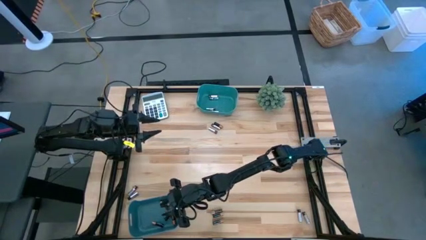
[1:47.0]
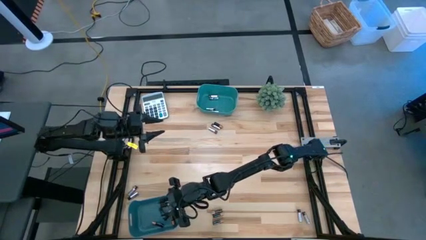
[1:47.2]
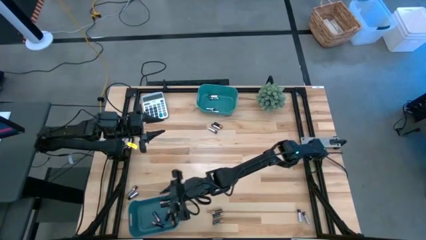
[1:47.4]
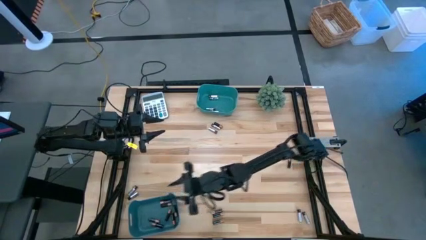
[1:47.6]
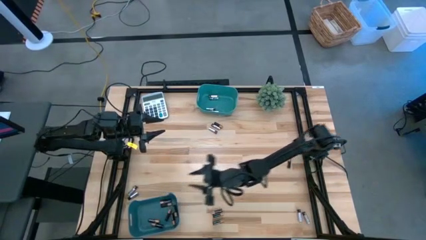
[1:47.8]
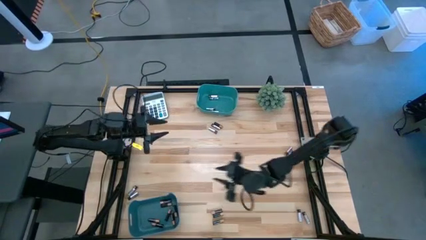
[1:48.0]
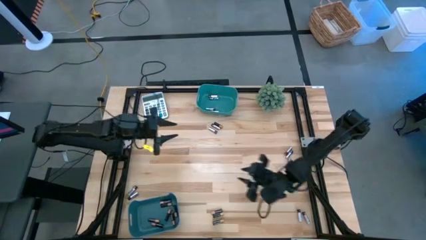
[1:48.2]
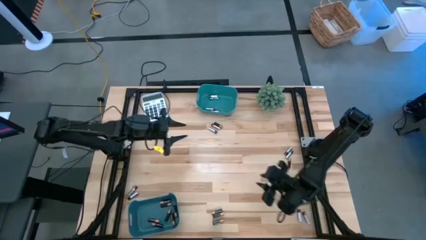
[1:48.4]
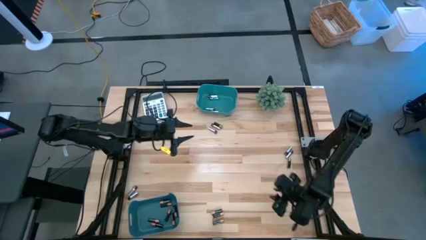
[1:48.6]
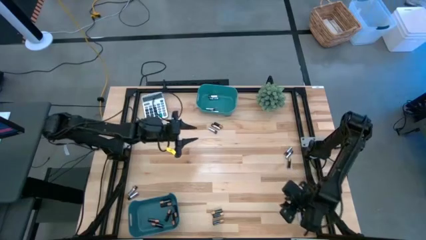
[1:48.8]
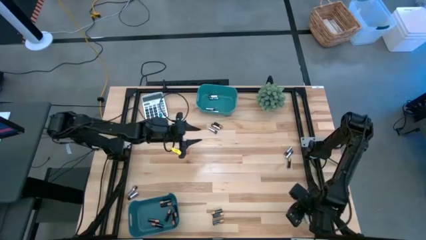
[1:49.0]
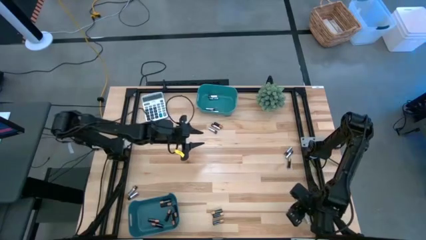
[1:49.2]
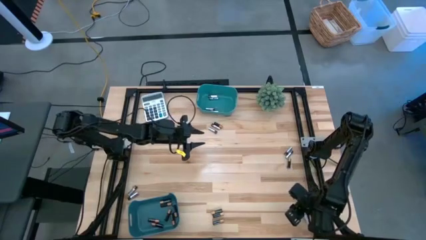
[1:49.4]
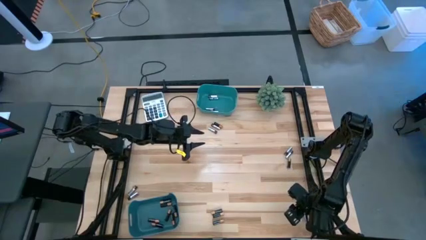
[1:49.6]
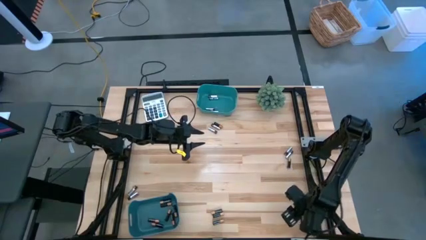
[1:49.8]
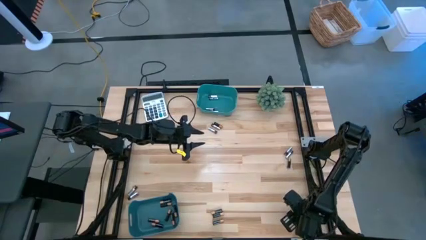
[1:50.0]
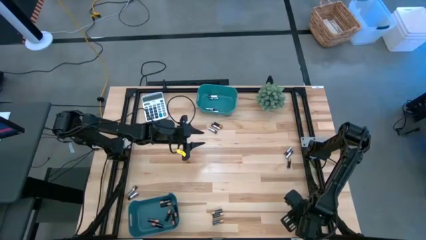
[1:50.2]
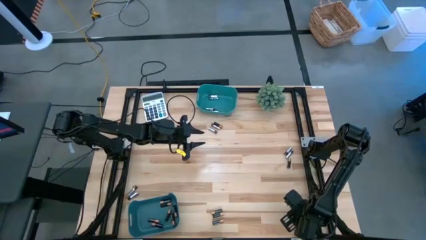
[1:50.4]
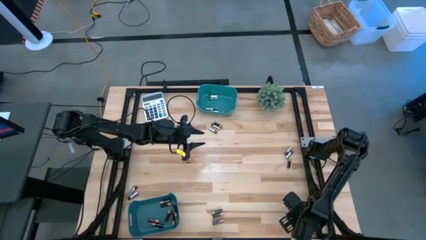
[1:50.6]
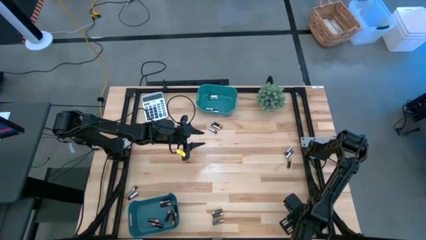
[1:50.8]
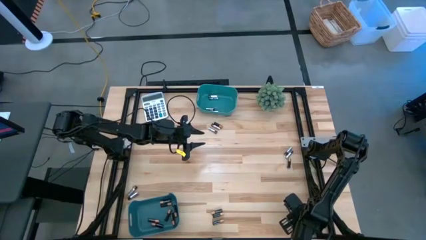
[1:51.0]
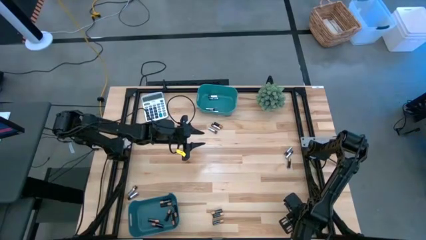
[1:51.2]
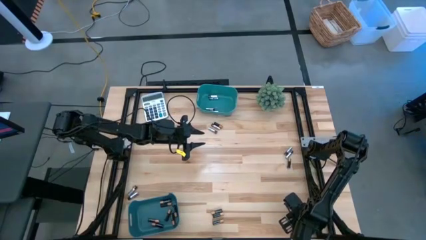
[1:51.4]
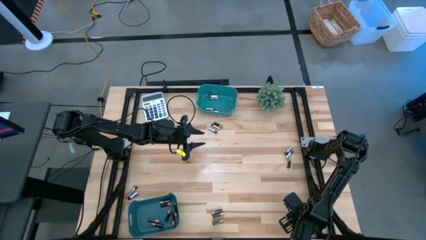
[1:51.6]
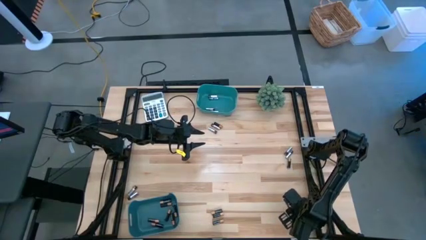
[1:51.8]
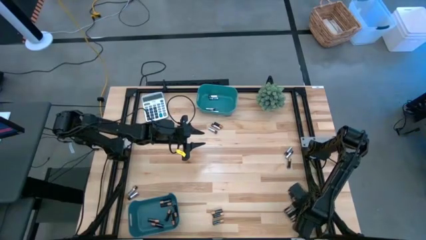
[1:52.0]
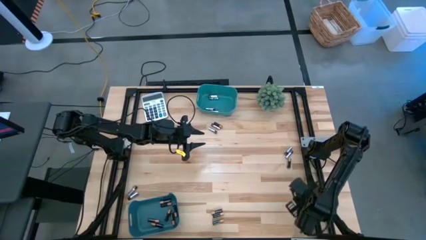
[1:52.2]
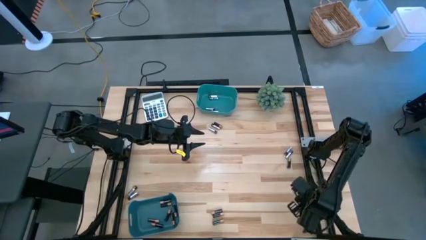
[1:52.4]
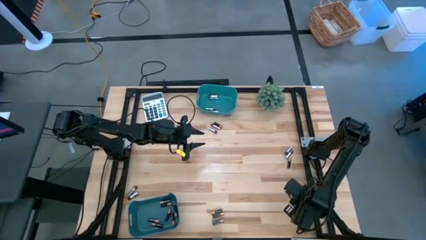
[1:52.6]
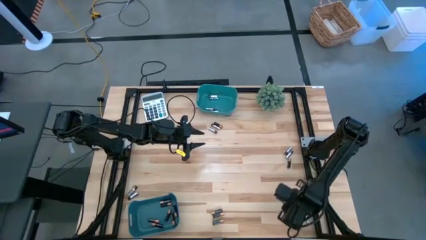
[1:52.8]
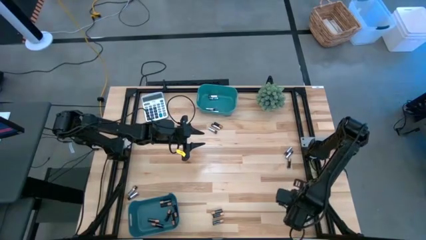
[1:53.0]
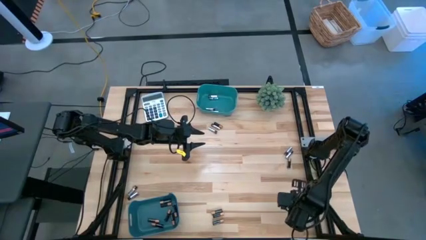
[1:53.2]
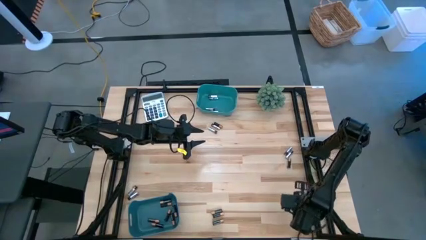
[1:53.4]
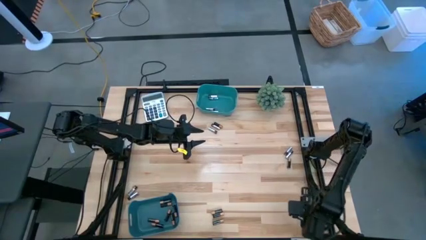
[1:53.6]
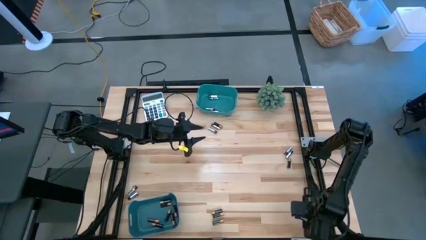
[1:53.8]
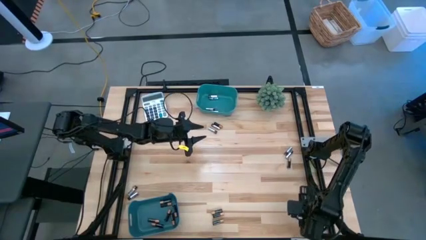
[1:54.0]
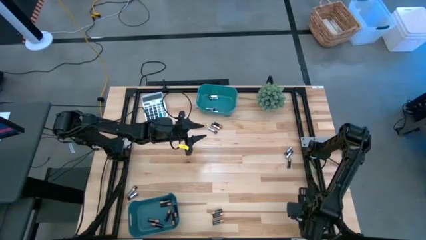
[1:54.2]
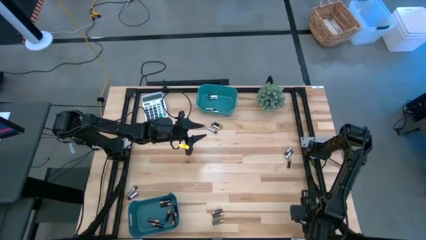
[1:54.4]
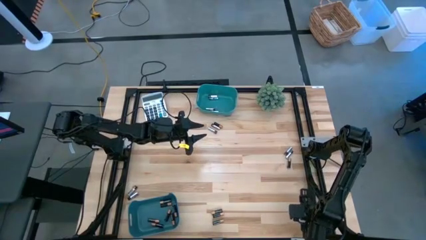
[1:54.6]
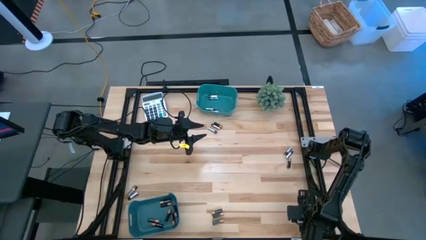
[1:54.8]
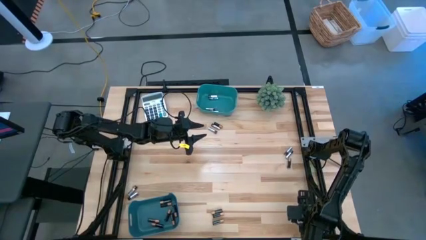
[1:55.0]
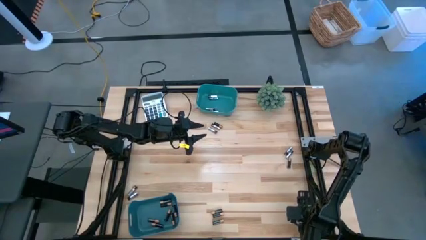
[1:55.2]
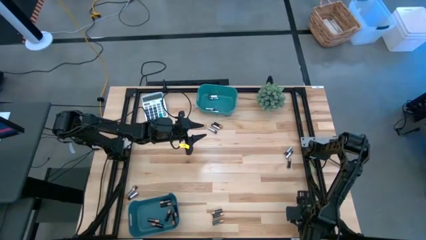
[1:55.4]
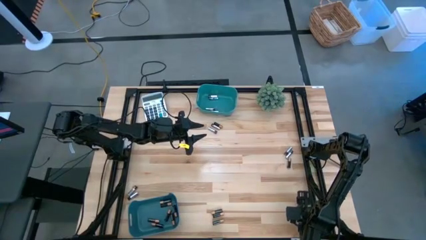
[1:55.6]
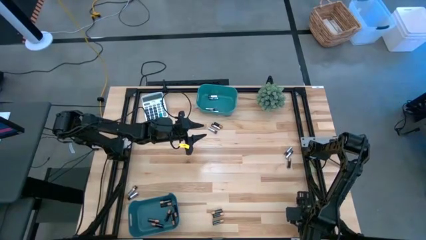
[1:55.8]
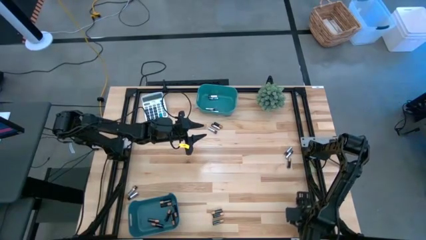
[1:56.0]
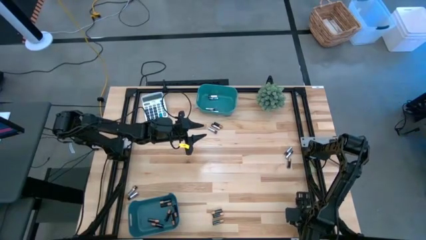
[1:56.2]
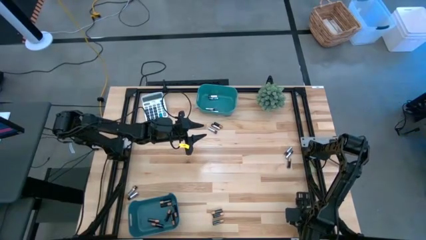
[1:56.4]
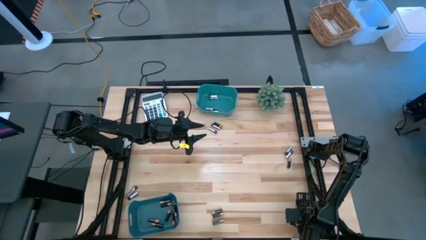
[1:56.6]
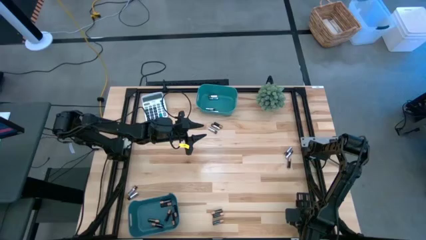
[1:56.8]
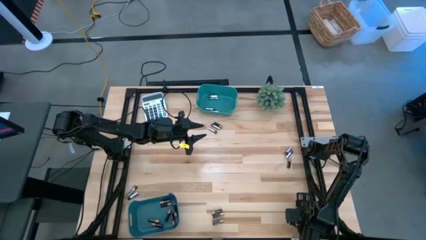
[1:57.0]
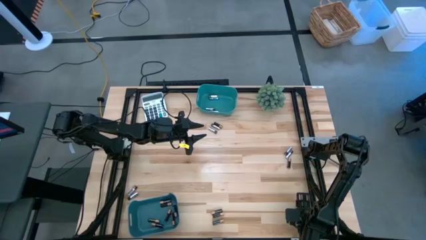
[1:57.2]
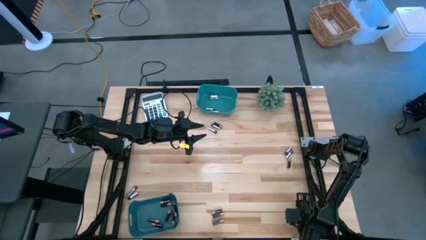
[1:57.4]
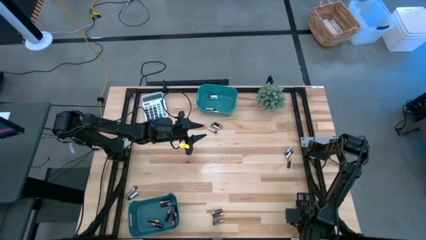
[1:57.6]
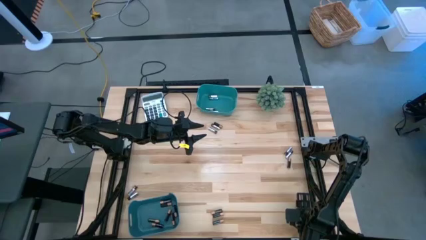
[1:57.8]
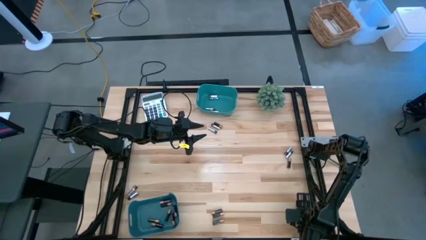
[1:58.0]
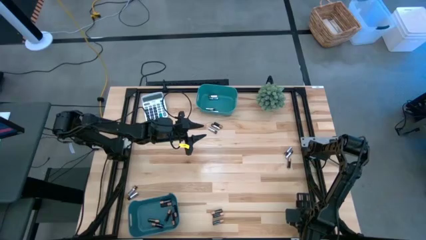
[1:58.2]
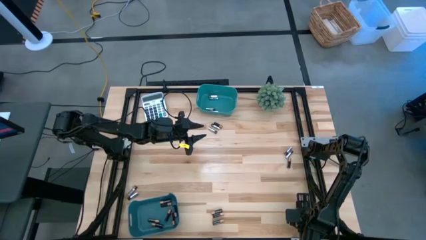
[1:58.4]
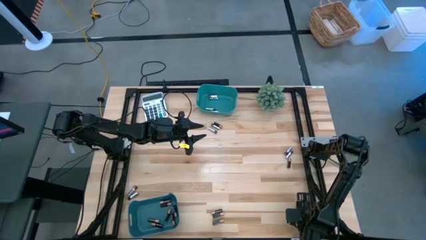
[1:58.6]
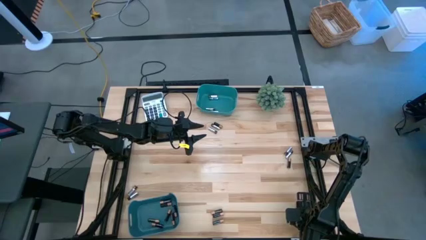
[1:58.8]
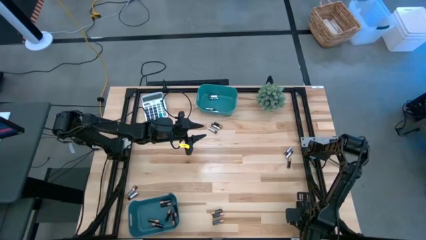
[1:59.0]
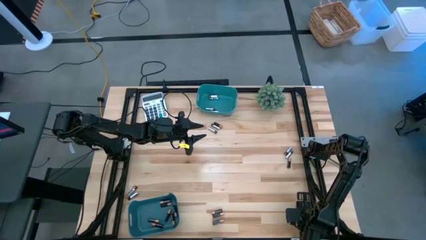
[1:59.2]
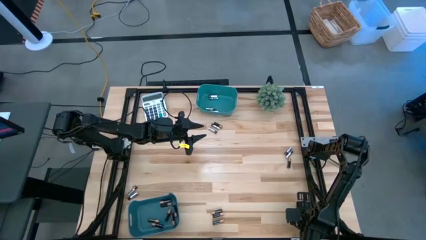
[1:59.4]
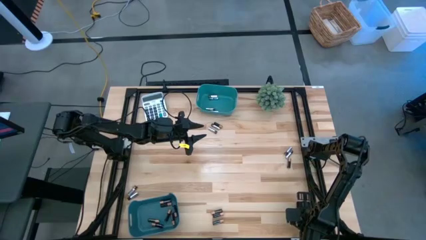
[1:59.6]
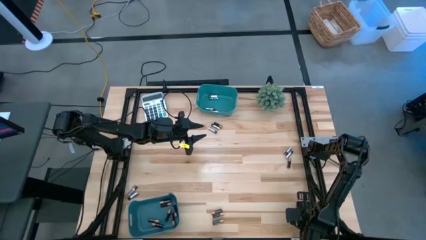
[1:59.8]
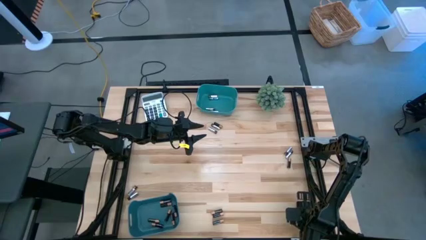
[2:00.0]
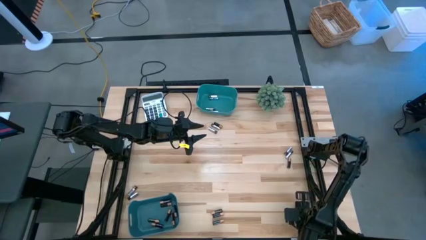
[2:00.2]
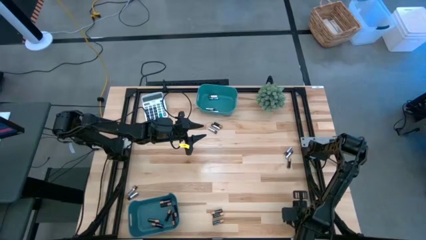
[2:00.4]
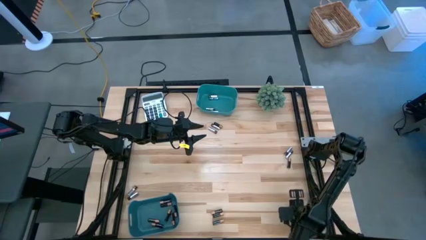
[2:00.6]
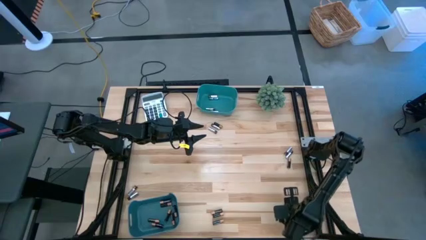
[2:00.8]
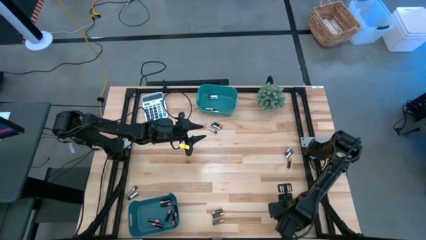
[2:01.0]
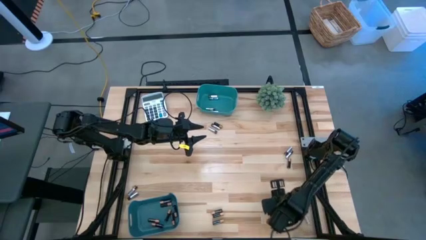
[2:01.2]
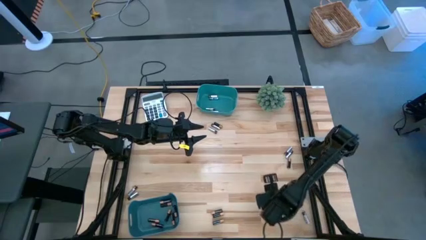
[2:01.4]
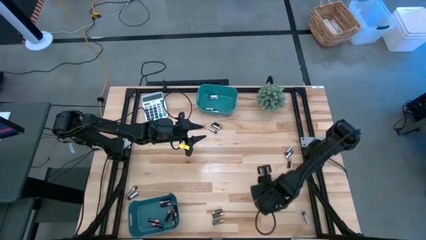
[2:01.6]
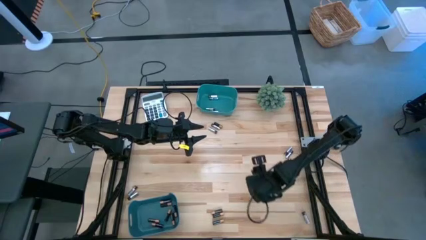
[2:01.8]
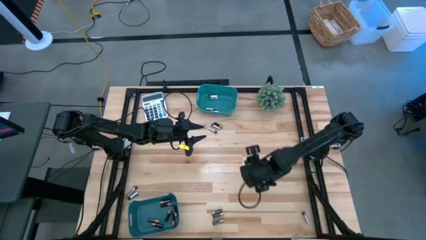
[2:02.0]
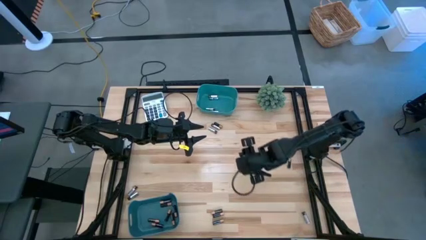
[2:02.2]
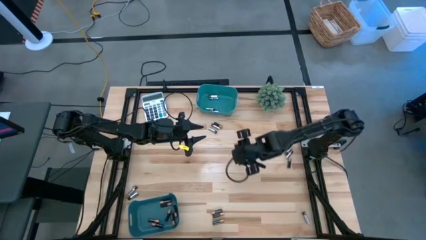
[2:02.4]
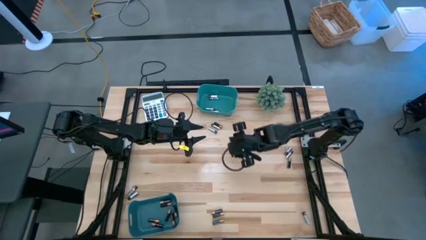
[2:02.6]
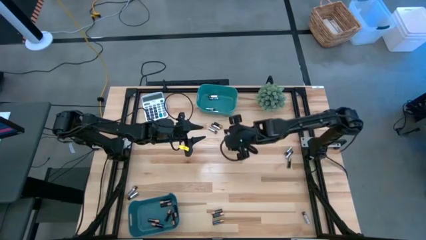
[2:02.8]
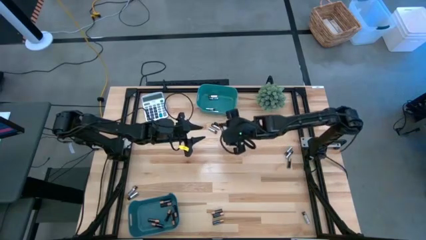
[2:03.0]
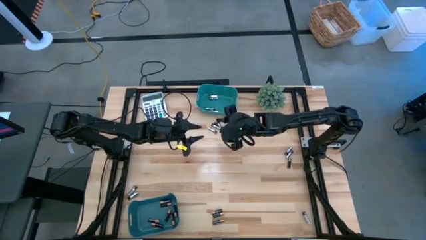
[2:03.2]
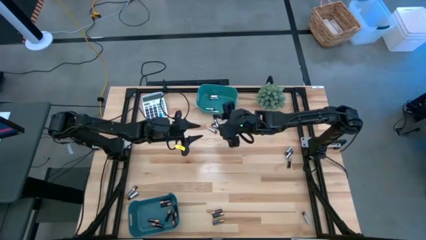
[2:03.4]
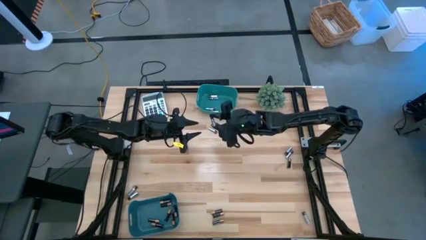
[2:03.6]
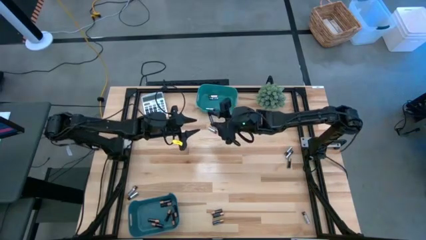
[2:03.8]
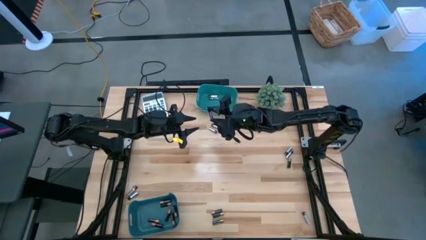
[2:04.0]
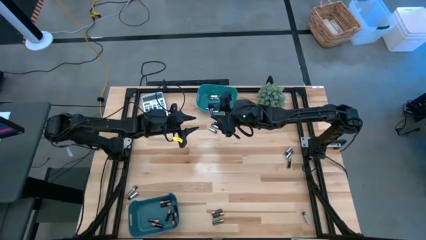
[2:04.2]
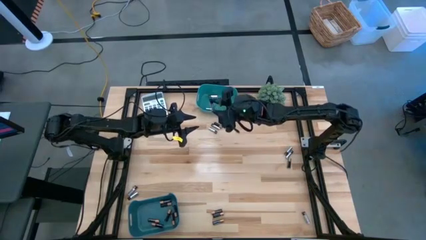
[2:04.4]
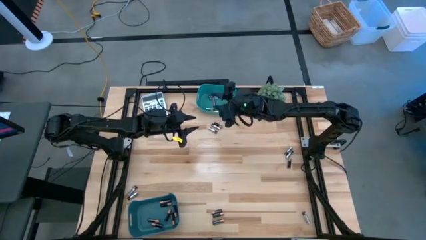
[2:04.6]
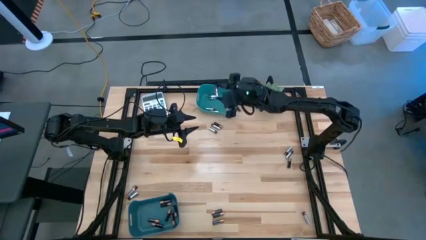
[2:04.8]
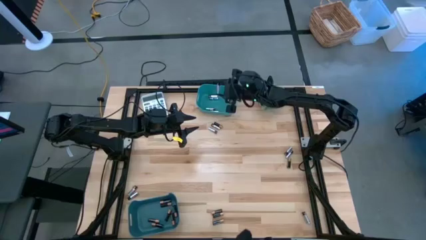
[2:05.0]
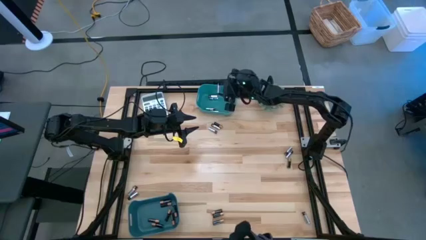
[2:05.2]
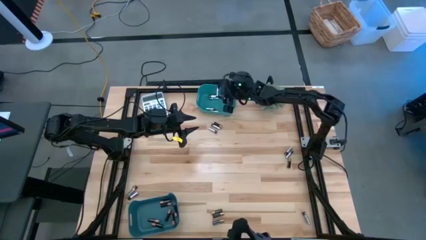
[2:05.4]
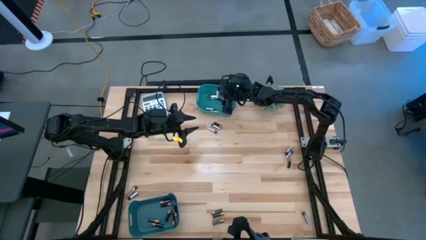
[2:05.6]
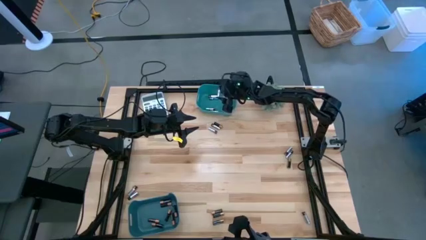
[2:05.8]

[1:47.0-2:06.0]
Task: Sort batteries
Put the silver battery into the top green bin
